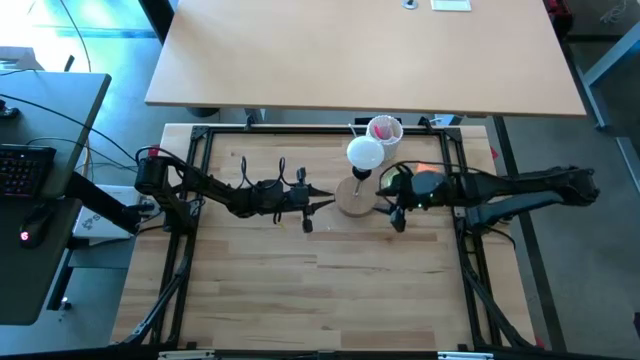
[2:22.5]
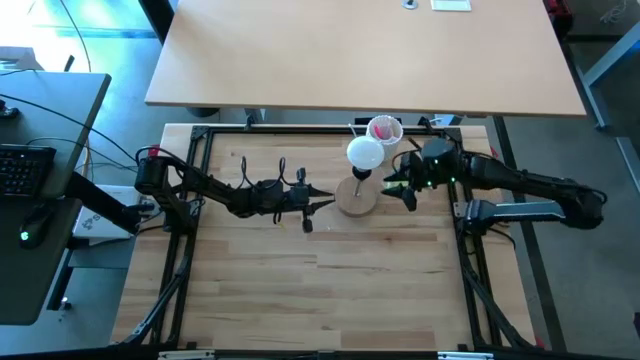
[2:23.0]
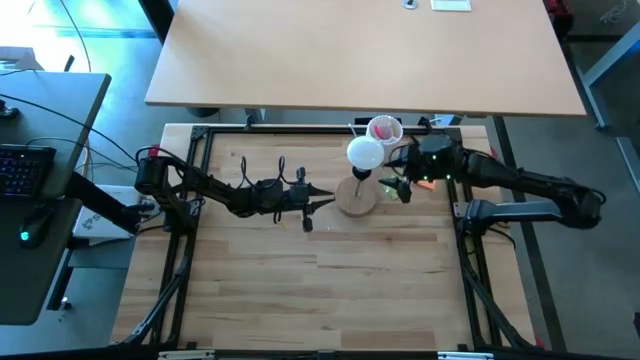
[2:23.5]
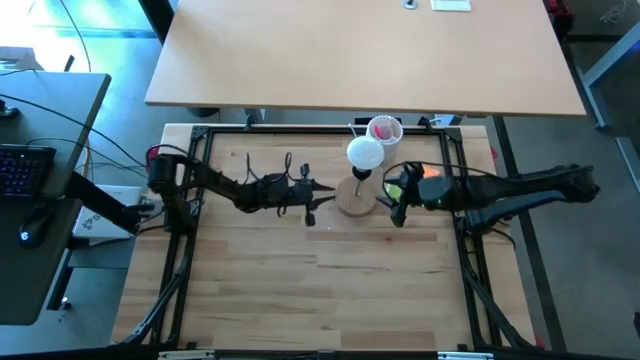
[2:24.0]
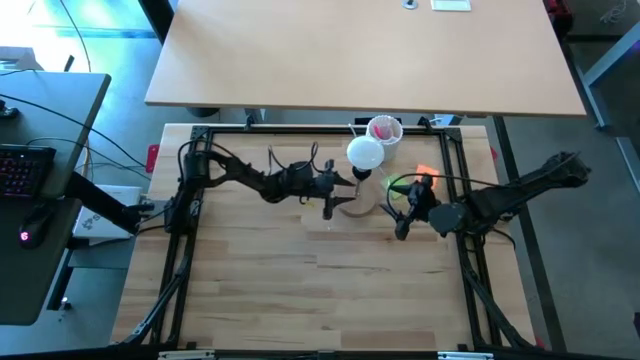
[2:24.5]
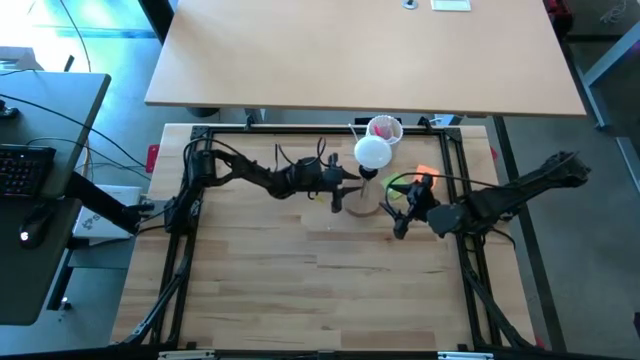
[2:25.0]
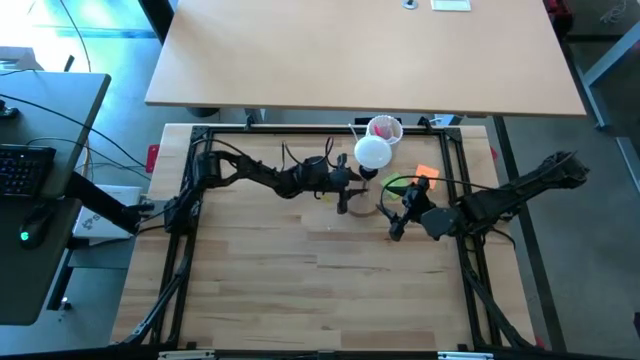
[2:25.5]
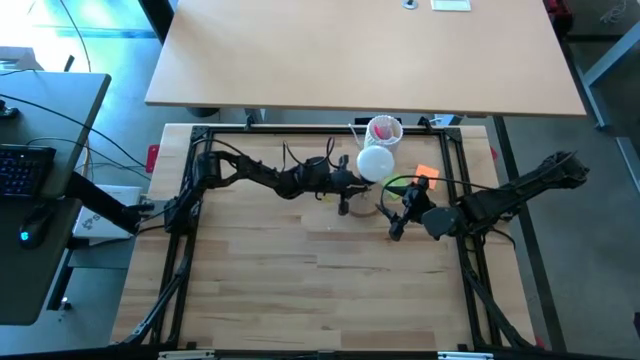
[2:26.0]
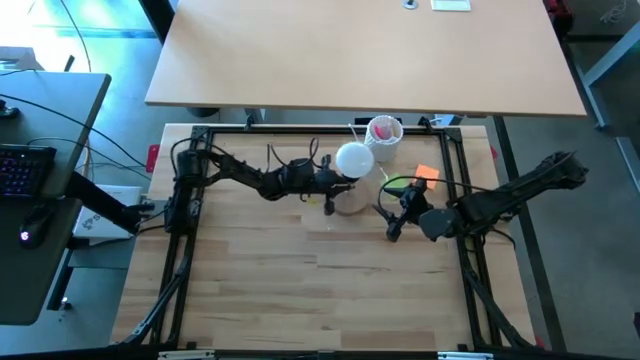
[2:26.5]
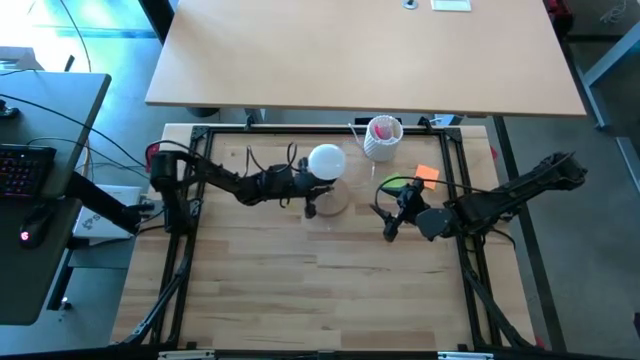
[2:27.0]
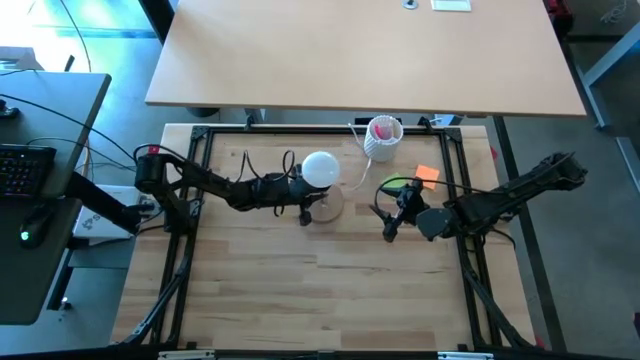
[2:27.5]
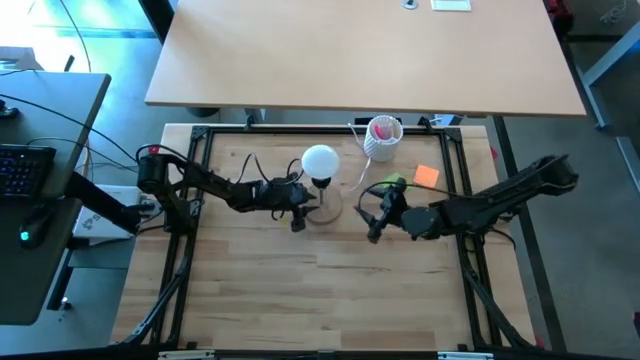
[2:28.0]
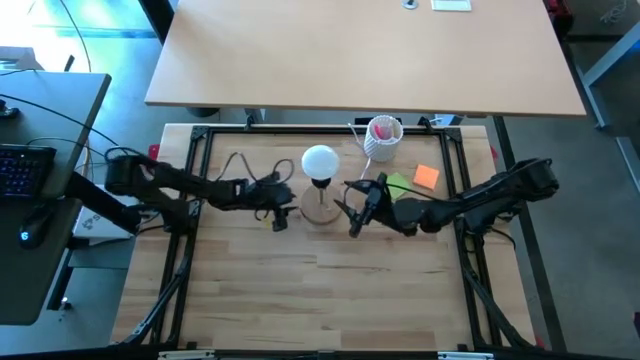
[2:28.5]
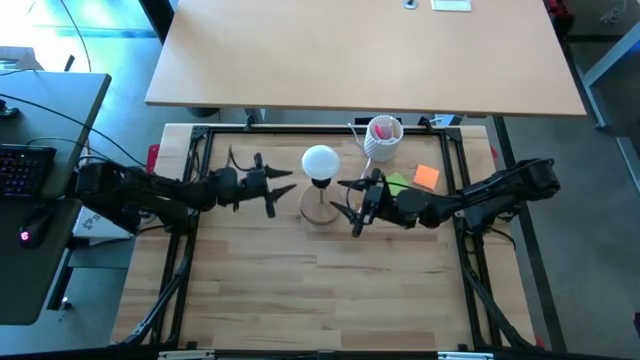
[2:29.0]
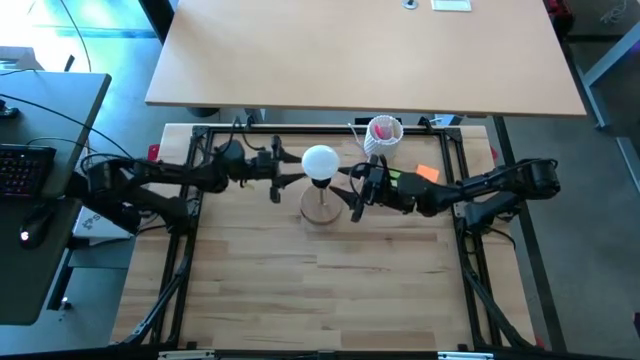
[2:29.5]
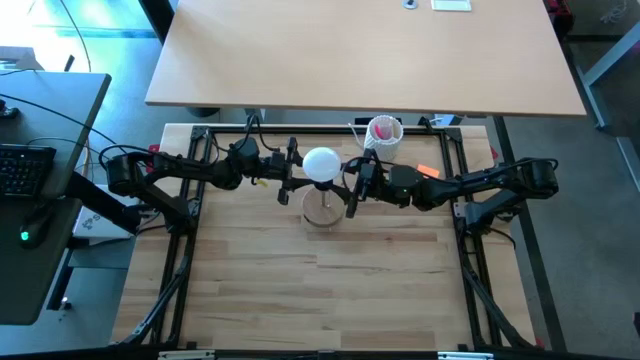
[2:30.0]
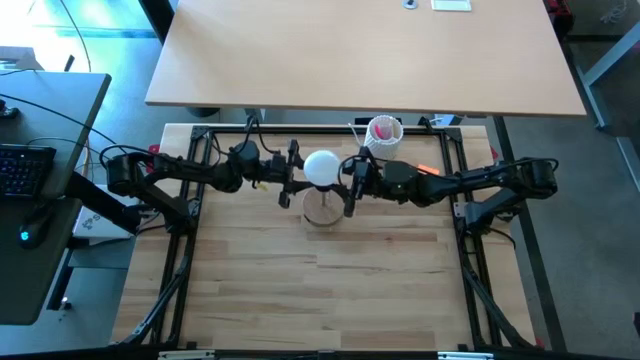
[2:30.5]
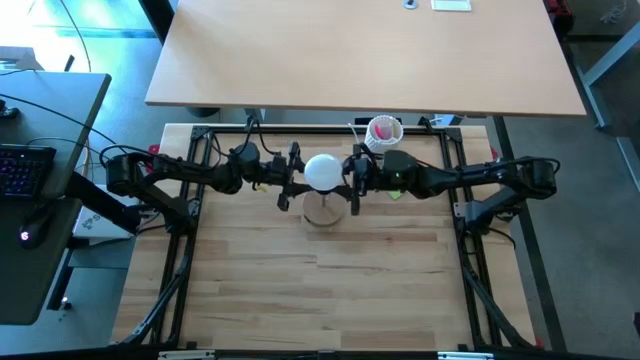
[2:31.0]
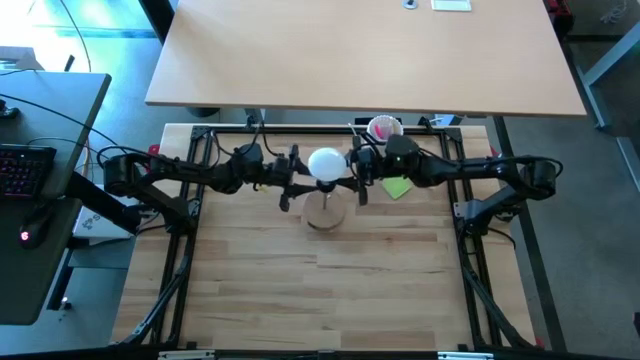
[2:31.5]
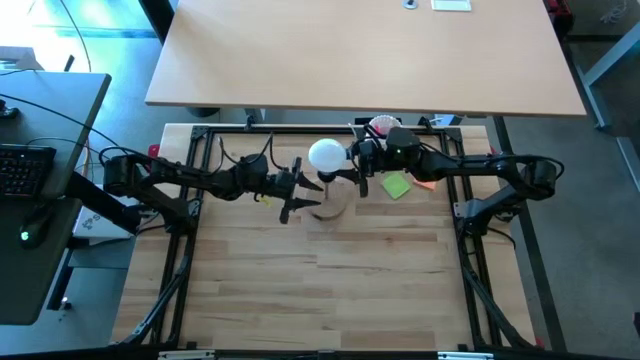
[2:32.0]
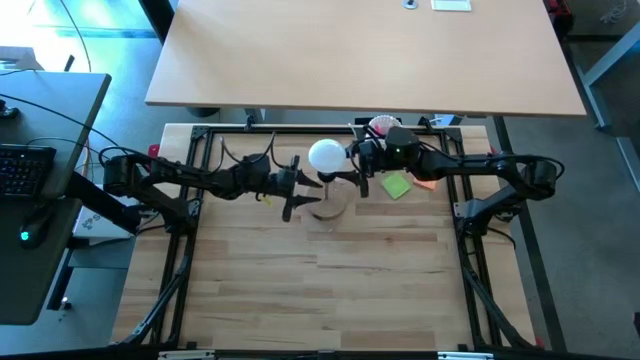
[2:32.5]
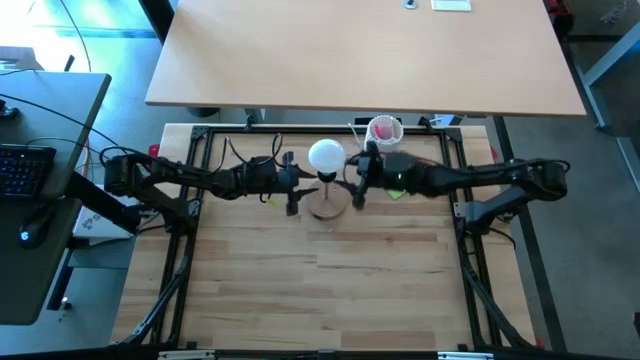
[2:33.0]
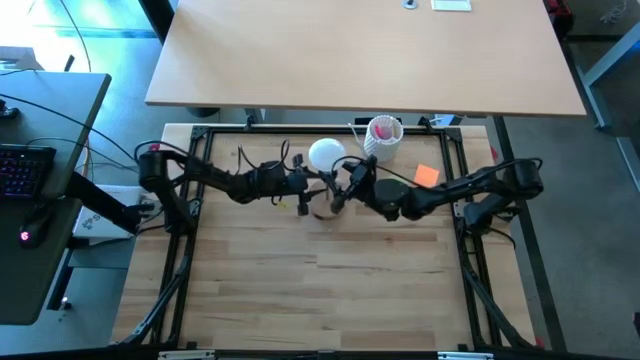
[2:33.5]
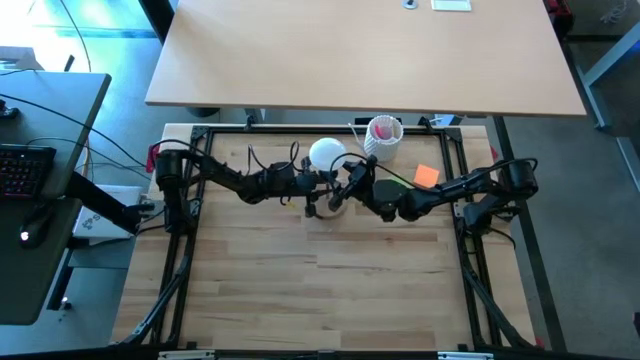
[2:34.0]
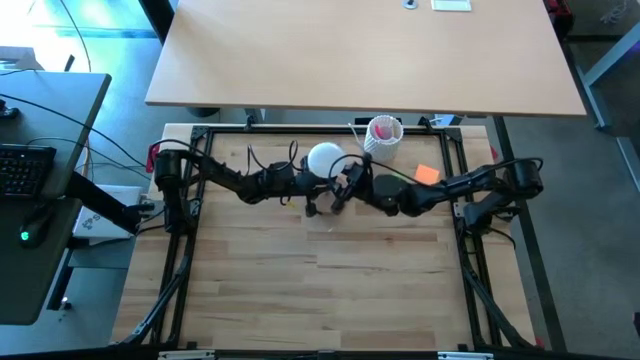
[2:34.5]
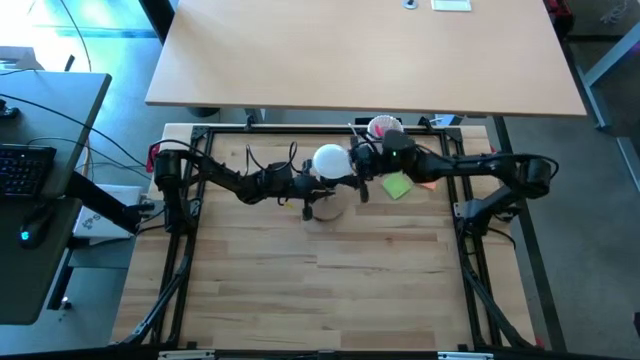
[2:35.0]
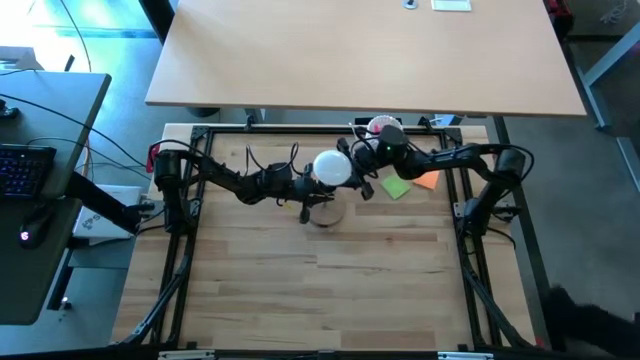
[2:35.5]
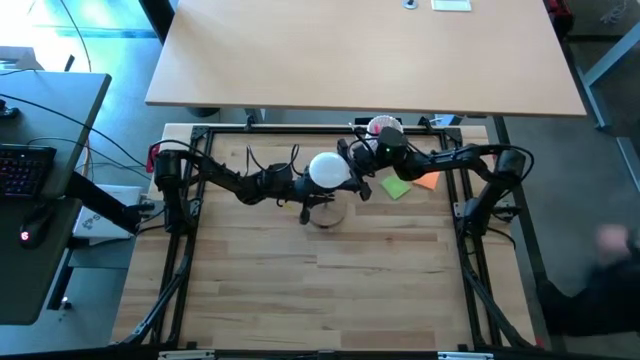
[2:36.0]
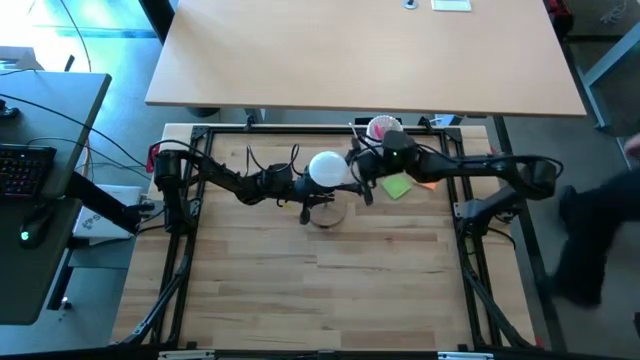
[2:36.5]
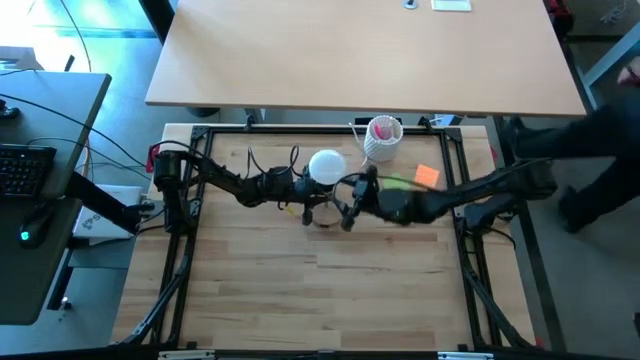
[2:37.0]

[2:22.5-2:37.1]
Task: Screw lightbulb
Remove the lightbulb from the lamp socket

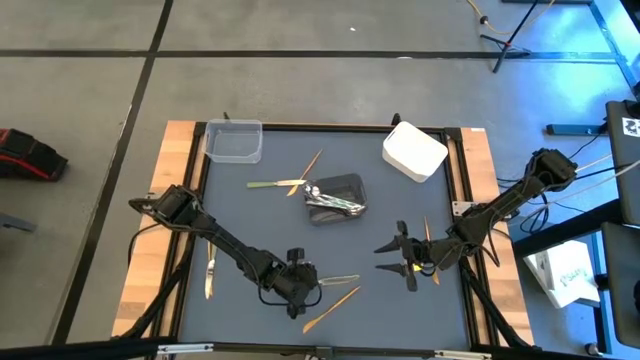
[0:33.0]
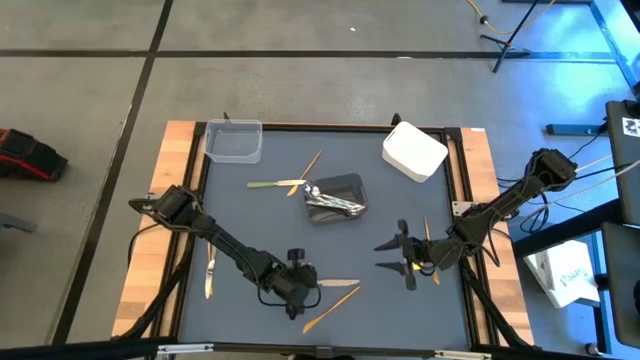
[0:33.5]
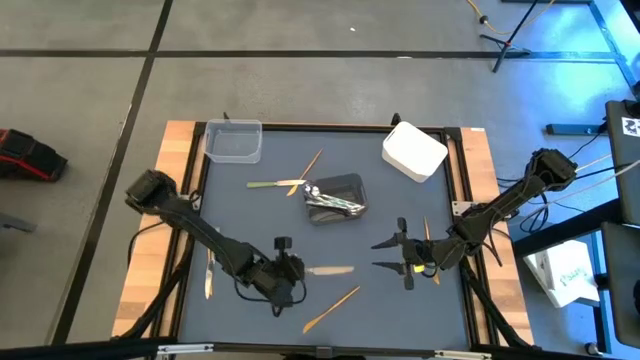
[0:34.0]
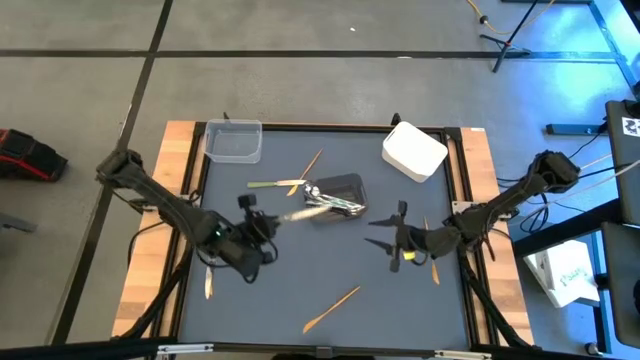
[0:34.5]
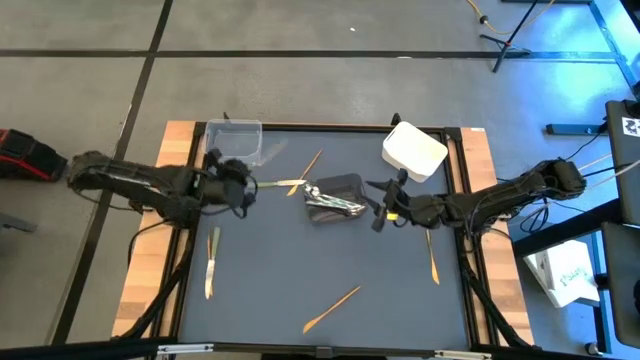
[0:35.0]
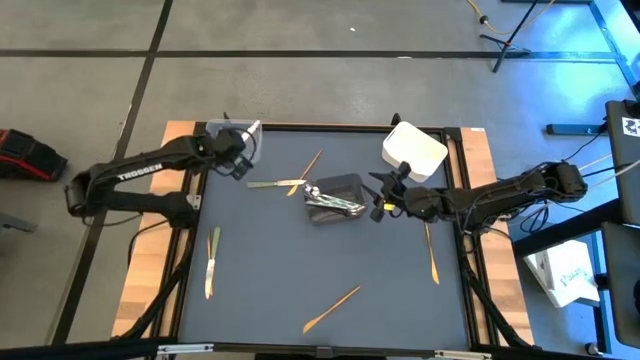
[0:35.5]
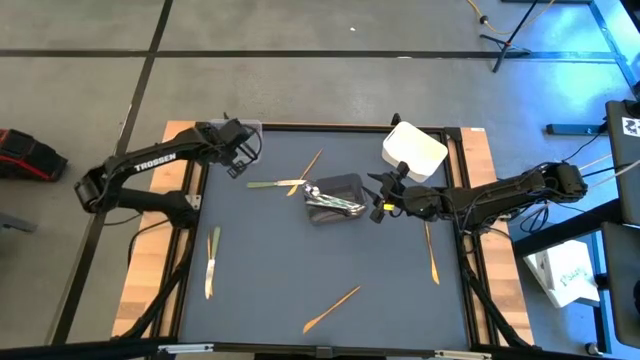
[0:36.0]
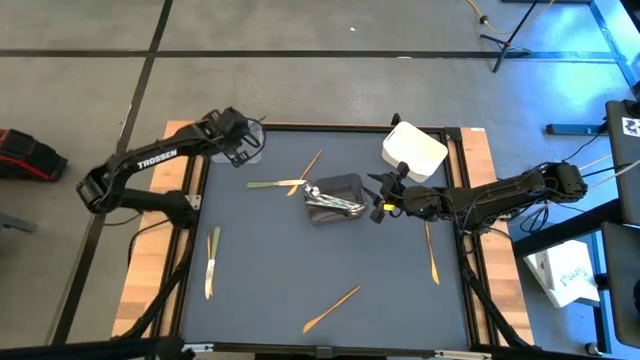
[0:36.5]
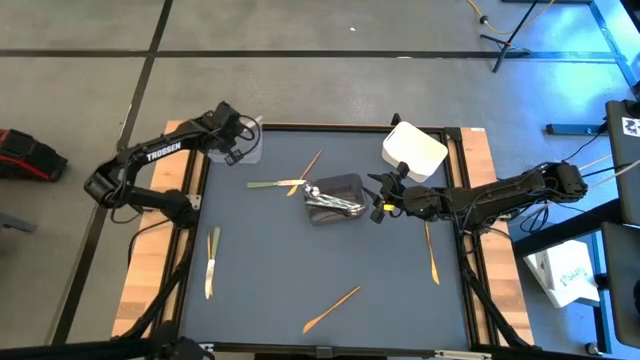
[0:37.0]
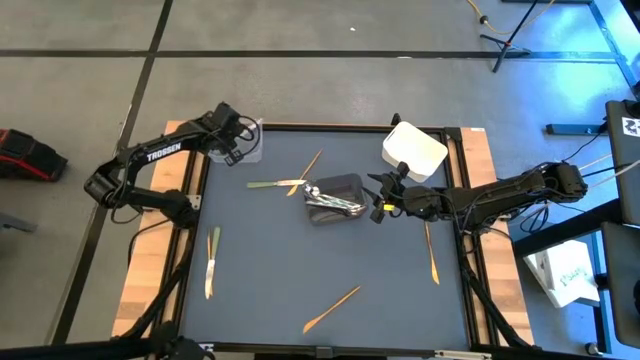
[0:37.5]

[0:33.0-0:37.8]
Task: Sort silverware by color (type)
Put the bottom green table knife into the transparent bin

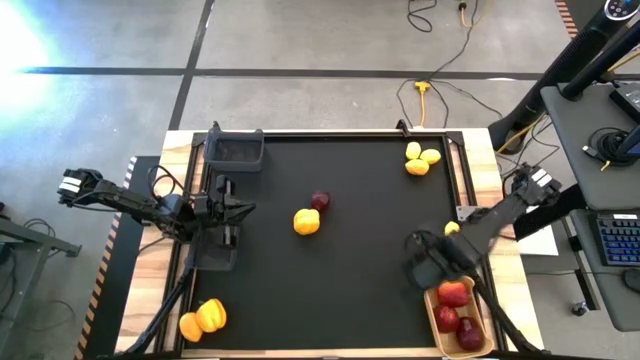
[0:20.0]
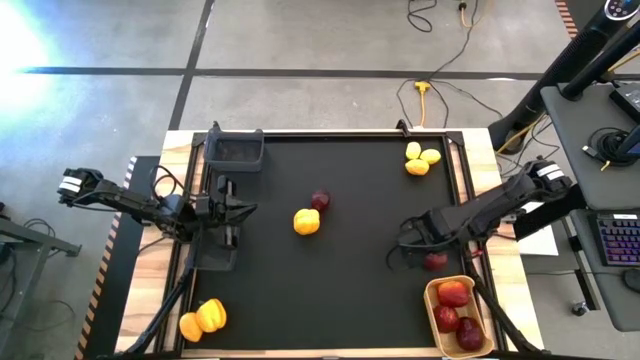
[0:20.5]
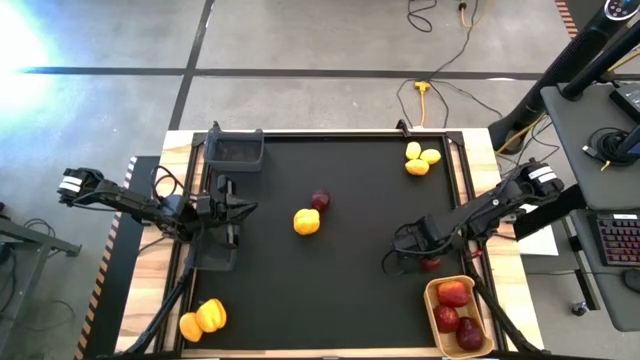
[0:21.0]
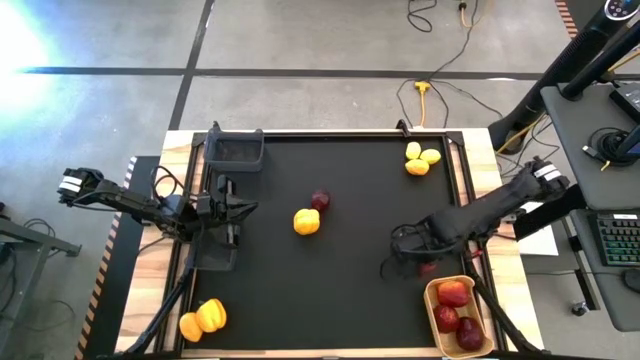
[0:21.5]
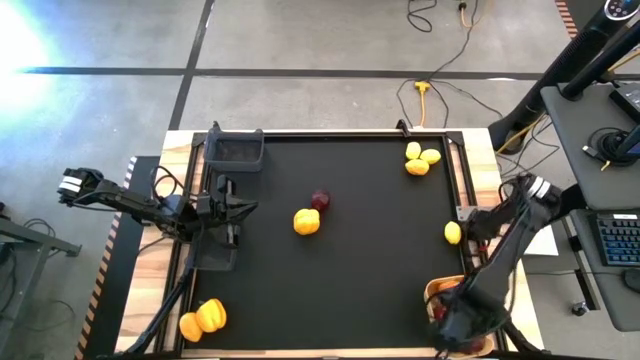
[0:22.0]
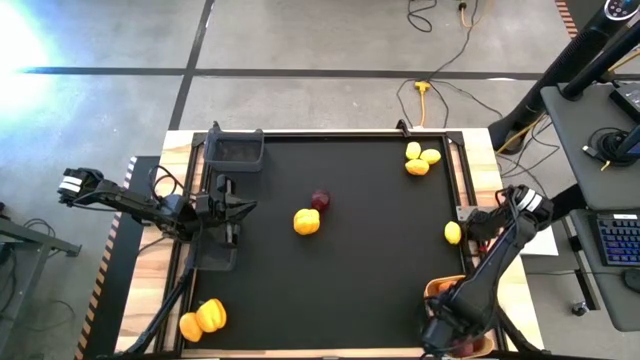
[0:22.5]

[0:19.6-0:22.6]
Task: Sort produce into baskets
Put the apple into the yellow bin
